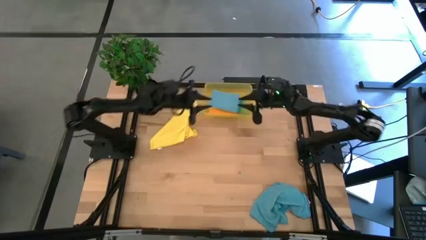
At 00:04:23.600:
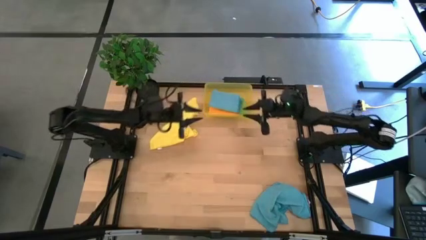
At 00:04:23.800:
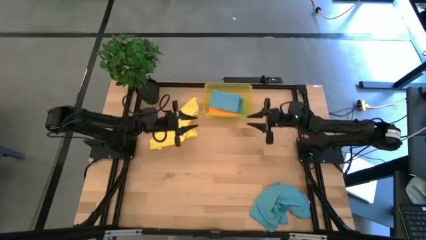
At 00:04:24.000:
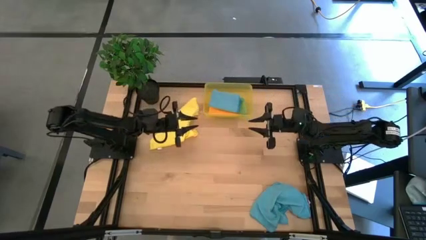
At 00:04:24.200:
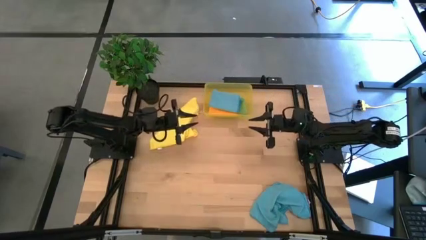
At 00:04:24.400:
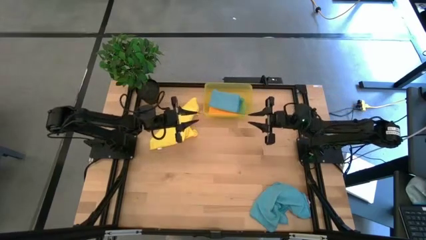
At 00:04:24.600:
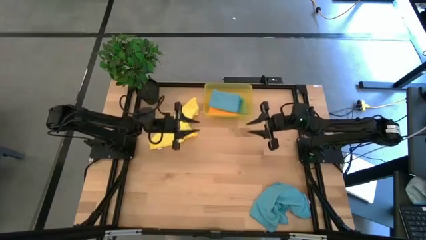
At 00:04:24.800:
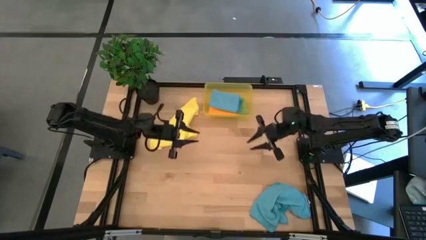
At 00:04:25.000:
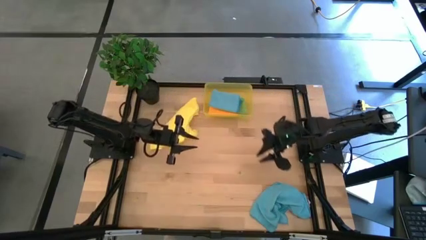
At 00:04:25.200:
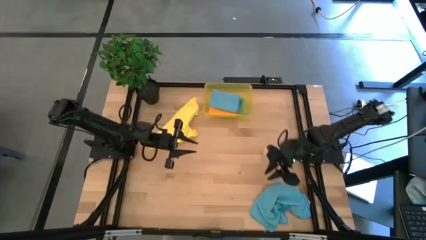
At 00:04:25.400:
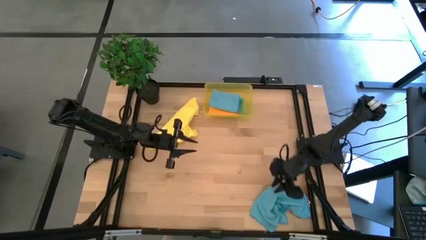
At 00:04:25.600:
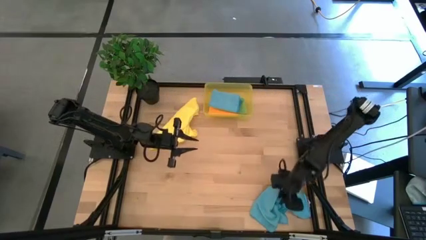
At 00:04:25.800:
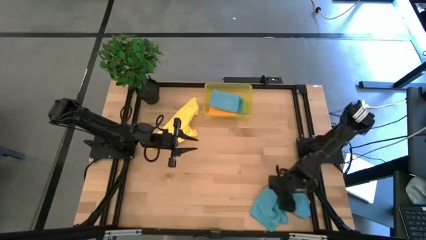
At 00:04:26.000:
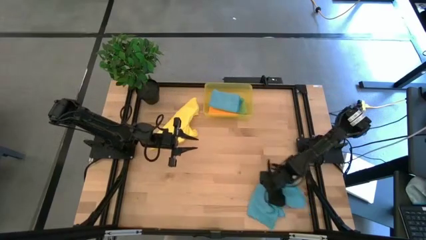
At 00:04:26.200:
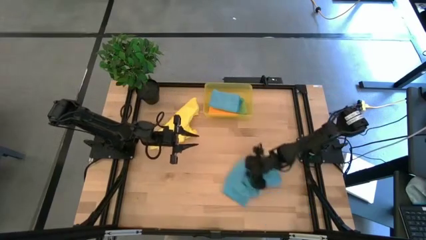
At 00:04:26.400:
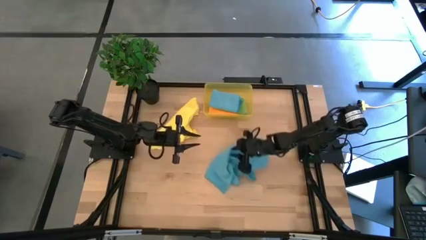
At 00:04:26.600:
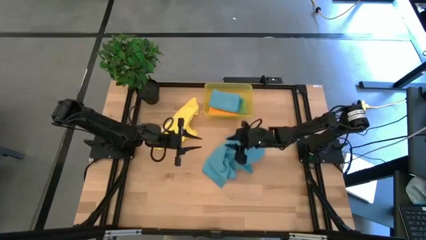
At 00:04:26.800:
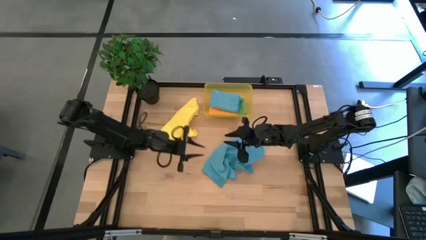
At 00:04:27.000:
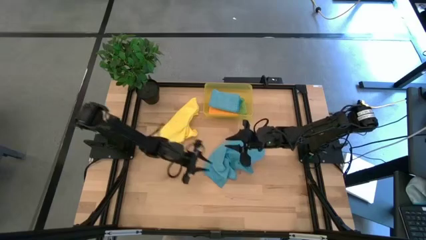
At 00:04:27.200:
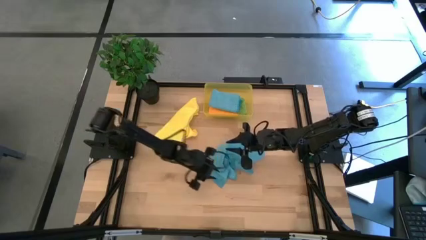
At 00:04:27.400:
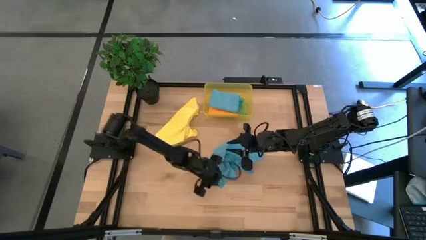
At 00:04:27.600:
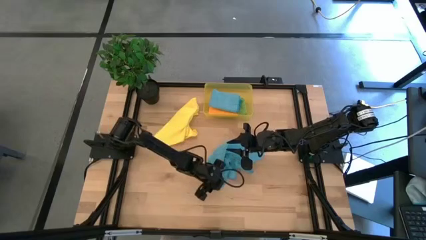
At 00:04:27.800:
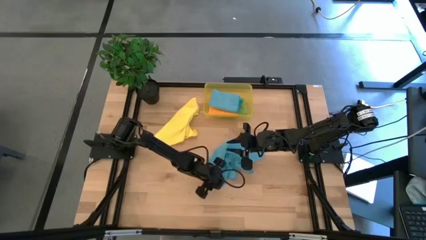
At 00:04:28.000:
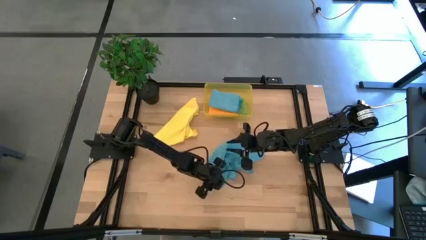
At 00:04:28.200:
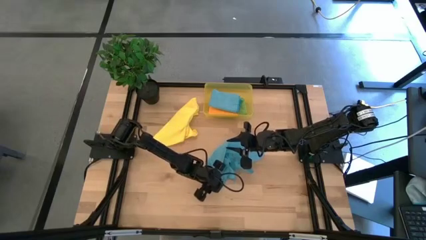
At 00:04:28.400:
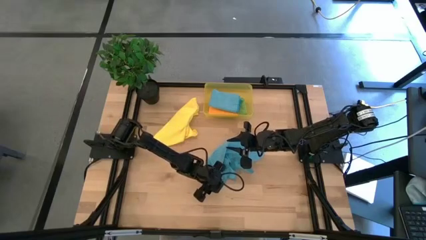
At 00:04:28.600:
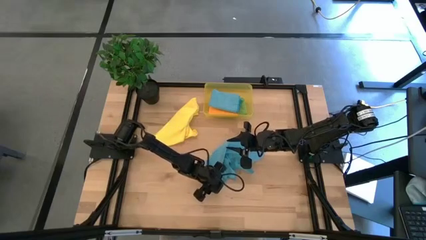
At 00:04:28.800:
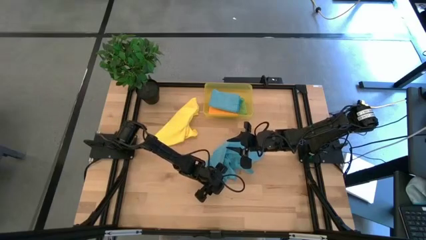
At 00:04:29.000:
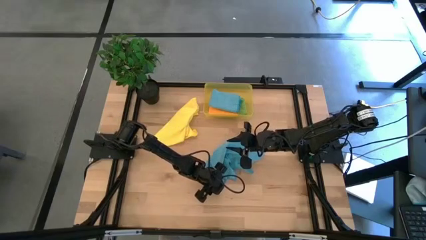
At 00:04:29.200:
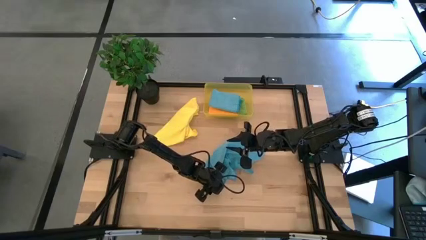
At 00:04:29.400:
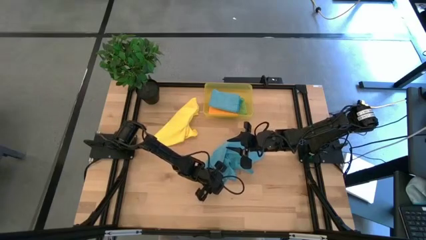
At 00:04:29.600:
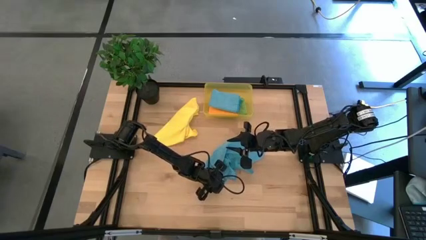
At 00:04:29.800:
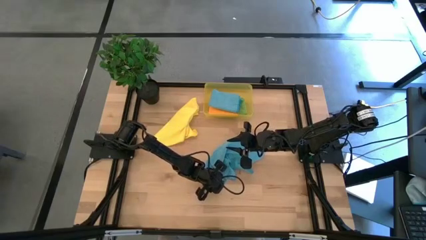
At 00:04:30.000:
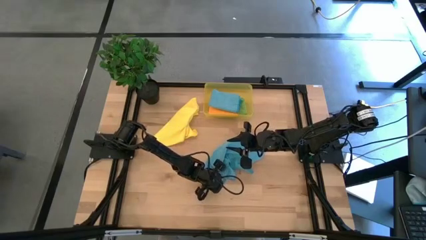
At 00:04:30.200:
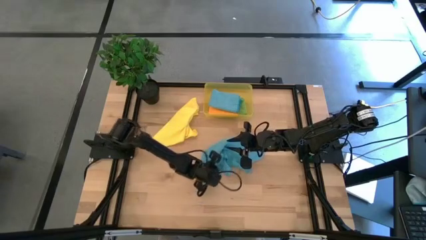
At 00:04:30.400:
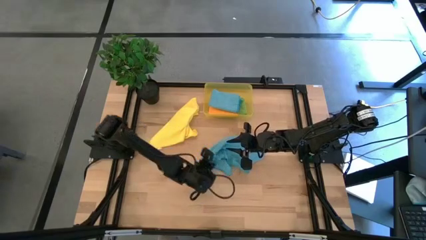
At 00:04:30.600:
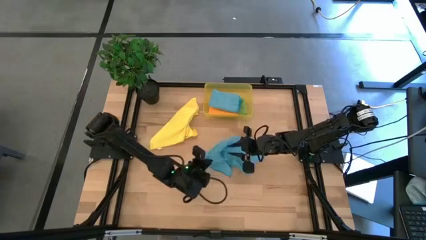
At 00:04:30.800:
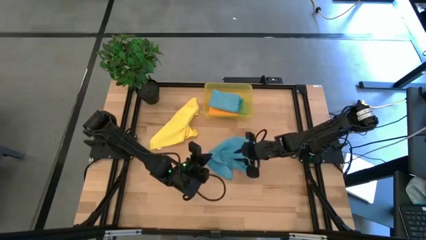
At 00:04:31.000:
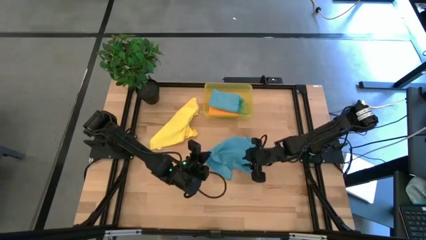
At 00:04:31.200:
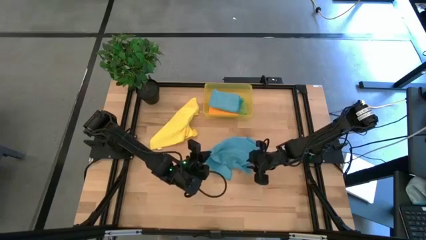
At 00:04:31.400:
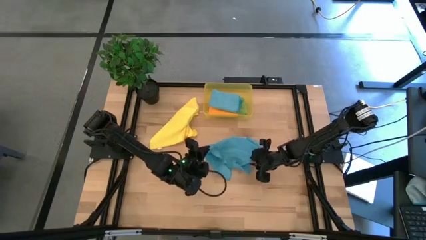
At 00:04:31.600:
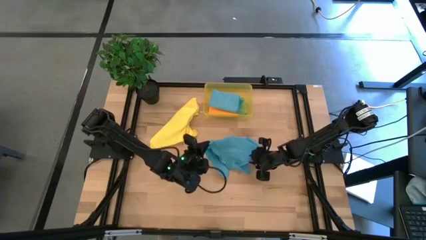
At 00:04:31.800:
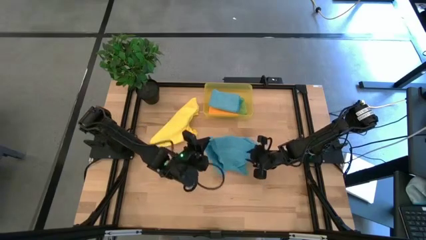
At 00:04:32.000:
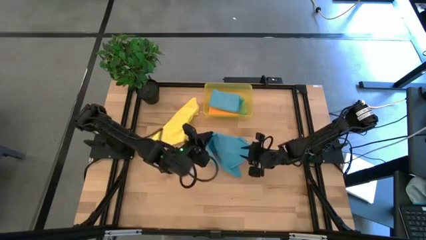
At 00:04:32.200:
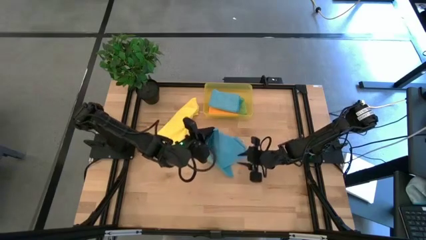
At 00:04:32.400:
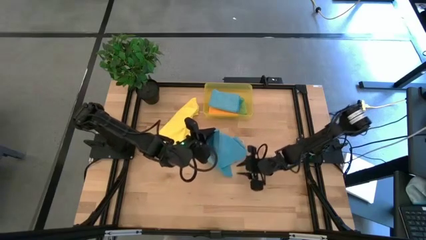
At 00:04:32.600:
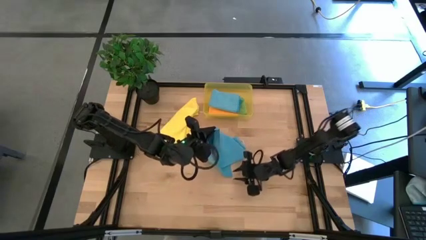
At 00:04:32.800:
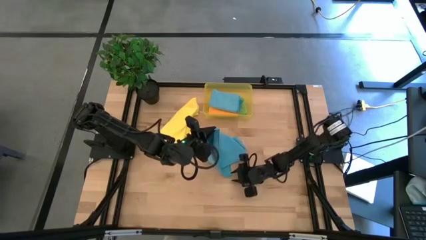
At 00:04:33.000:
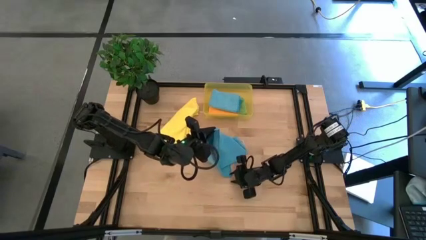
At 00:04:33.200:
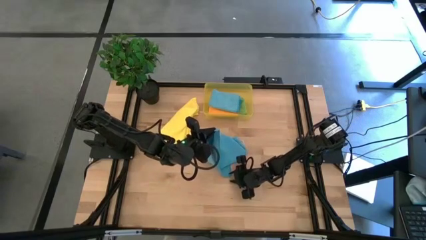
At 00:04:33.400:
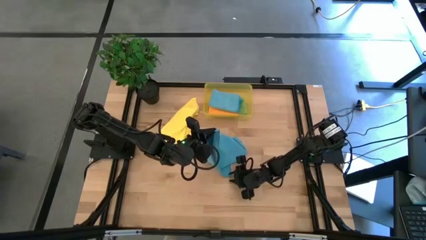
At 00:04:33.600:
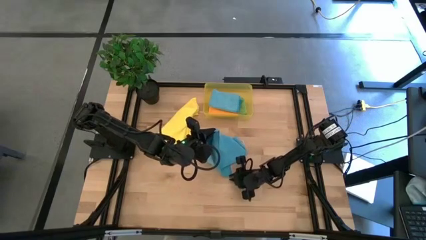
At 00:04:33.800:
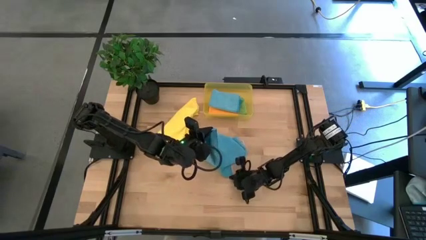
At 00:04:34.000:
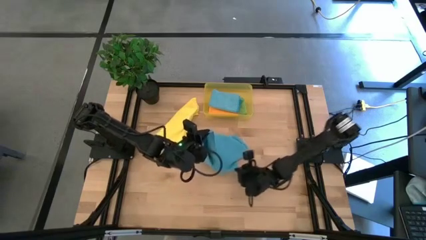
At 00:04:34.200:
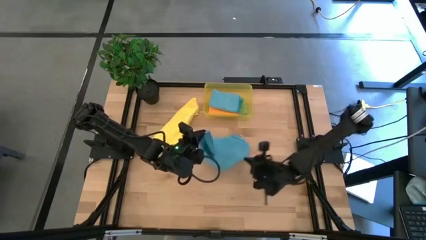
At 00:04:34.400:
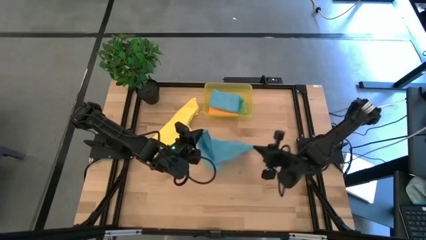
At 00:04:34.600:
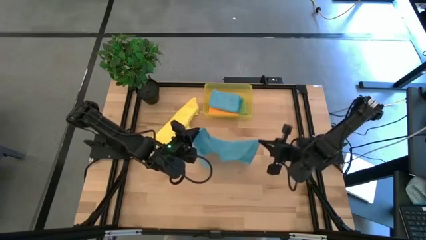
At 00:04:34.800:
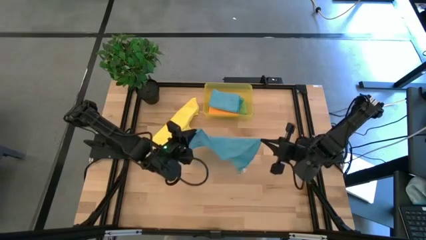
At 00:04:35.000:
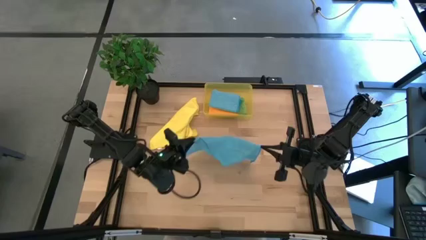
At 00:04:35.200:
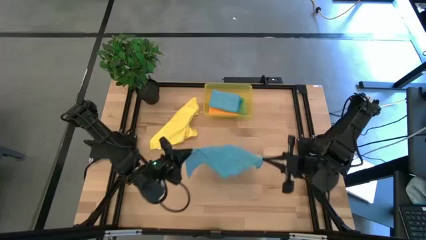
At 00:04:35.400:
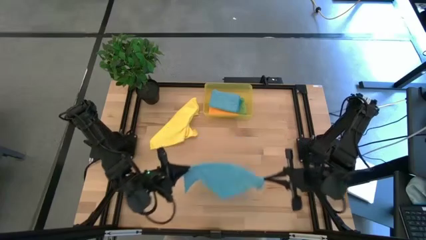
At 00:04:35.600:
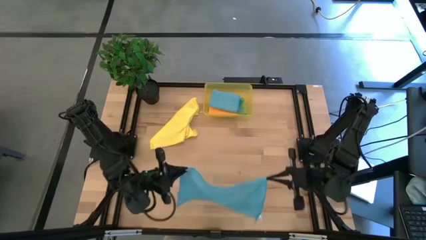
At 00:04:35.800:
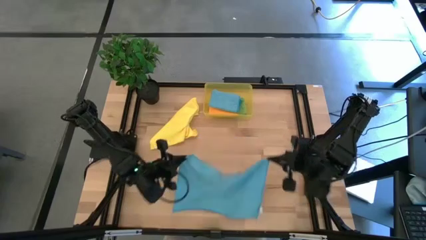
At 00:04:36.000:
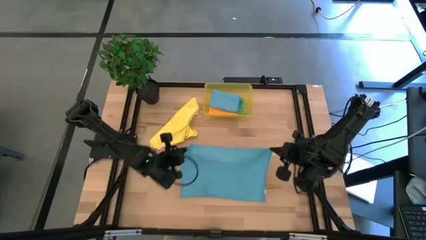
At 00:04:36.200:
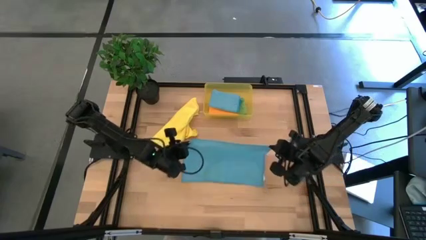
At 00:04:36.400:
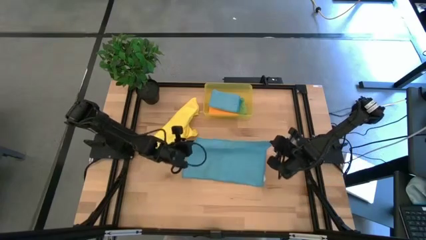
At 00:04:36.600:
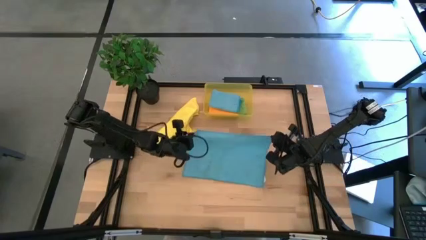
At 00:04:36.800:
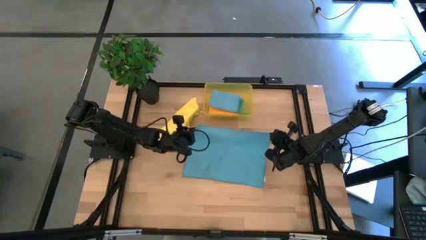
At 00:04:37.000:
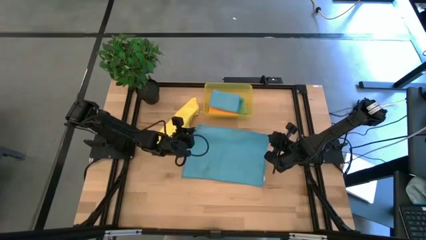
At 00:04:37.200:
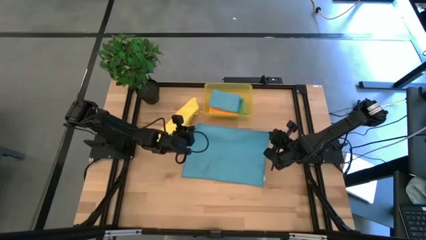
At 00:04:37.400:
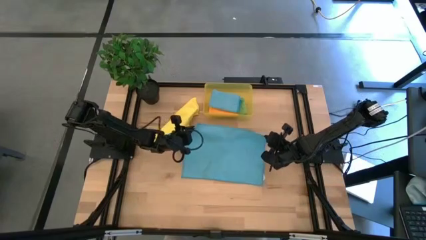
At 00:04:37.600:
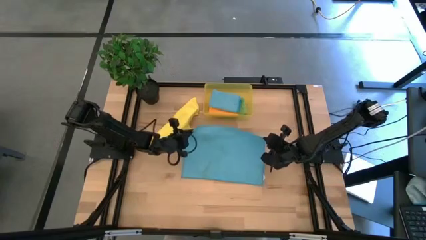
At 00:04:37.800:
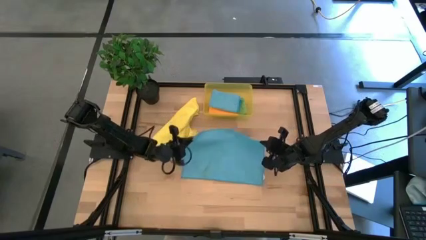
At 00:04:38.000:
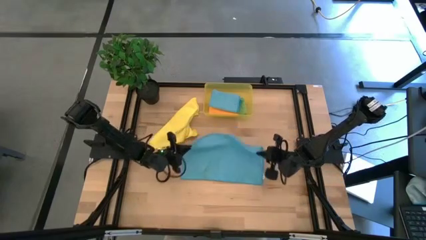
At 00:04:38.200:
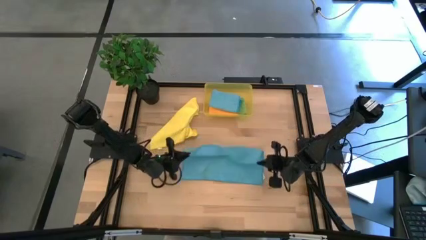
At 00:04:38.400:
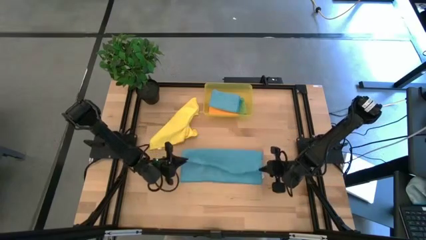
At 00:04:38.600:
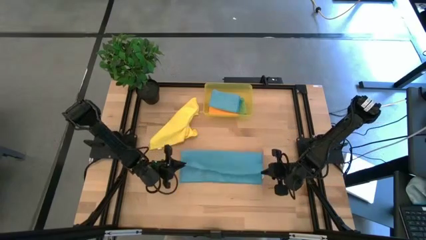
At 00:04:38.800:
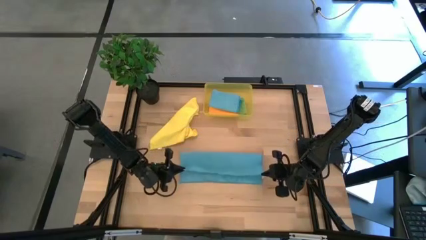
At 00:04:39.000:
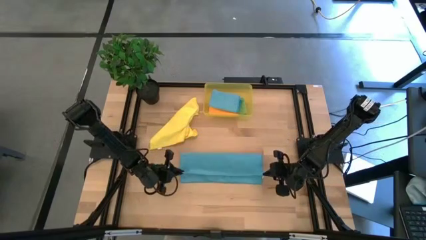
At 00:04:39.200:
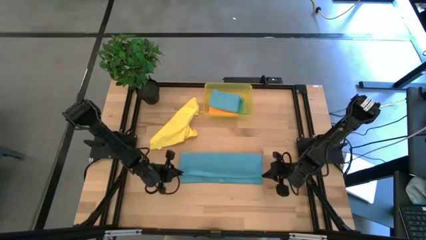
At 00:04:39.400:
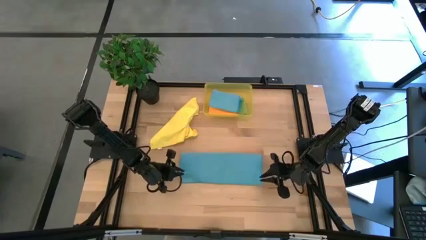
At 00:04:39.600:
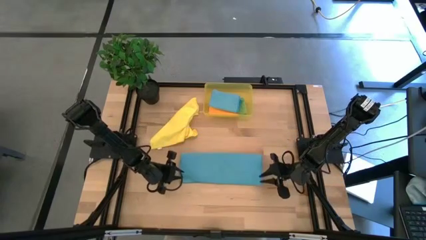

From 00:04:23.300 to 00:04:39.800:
Task: Fold microfiber towels
Fold the blue microfiber cloth
